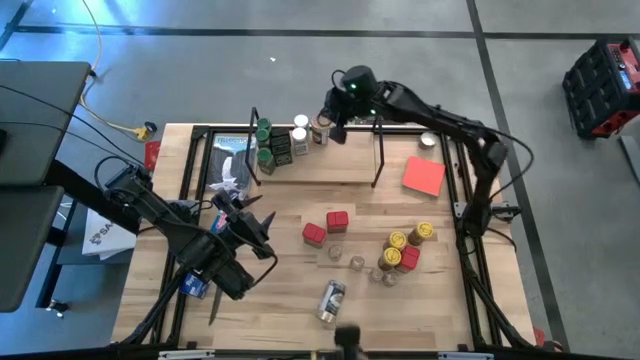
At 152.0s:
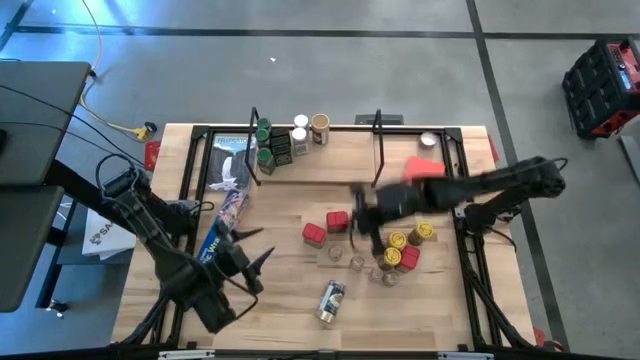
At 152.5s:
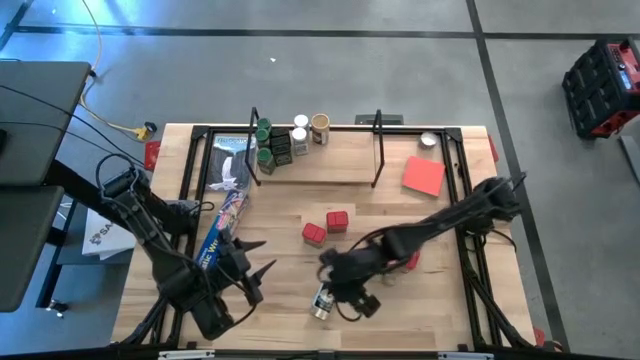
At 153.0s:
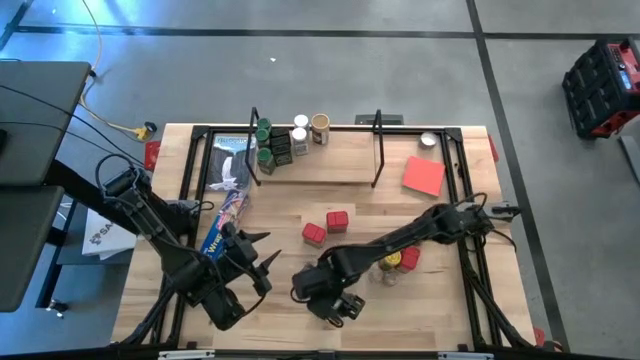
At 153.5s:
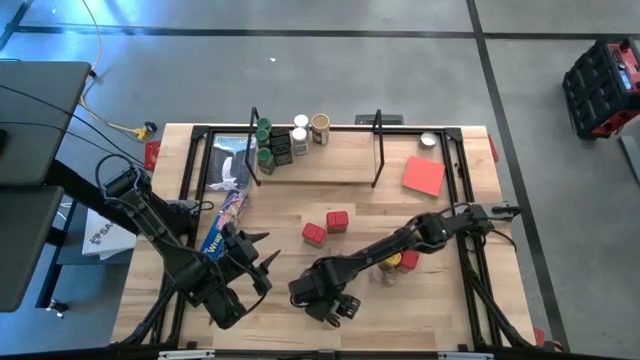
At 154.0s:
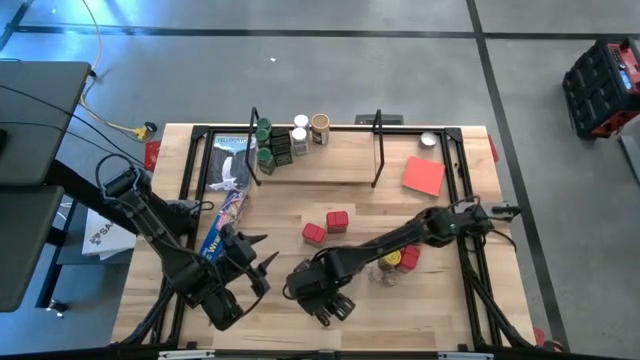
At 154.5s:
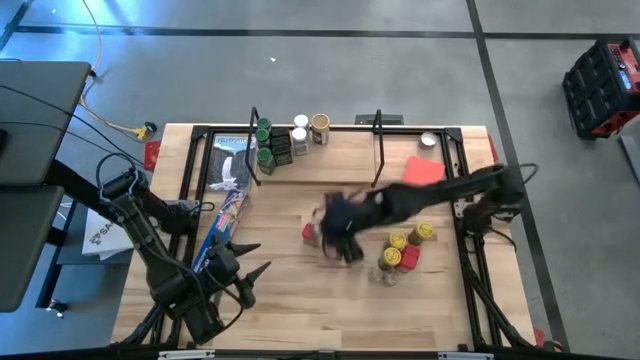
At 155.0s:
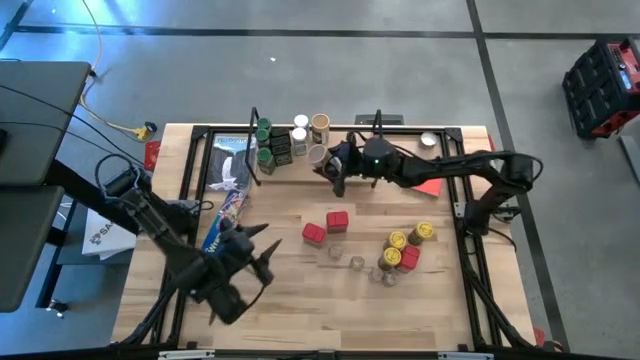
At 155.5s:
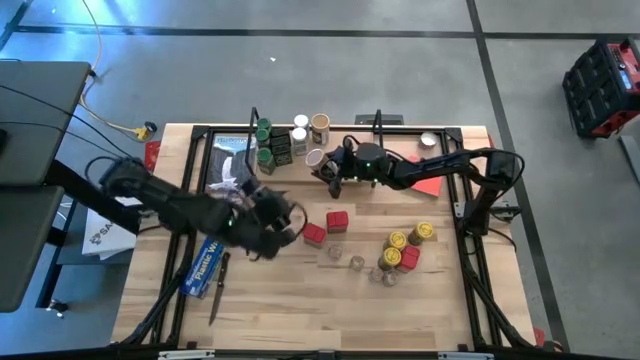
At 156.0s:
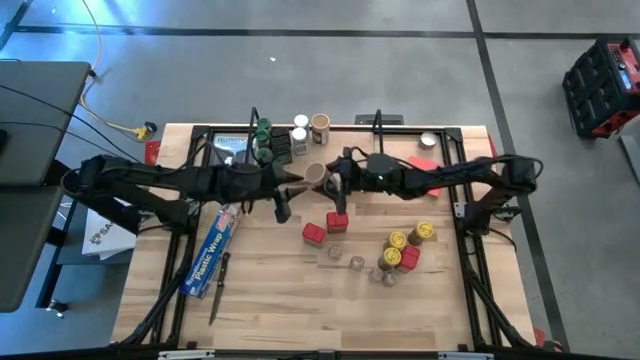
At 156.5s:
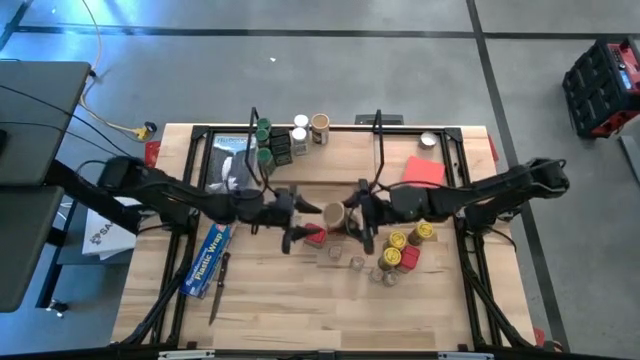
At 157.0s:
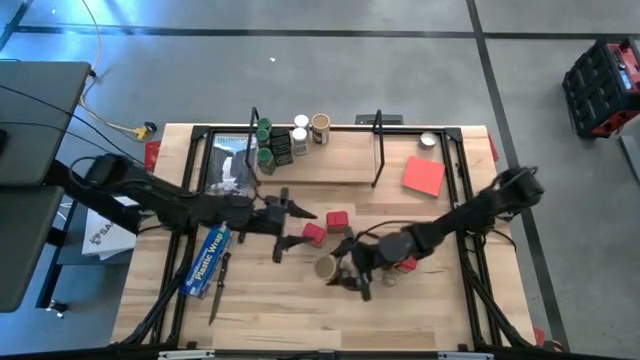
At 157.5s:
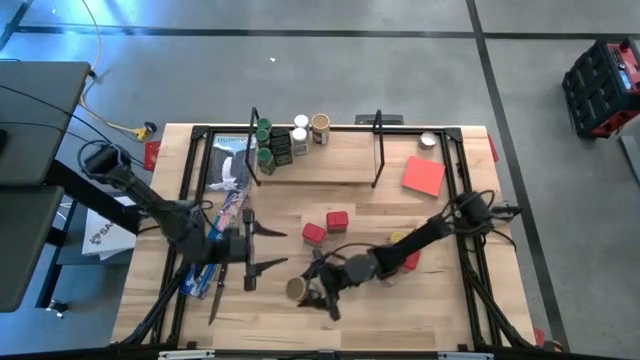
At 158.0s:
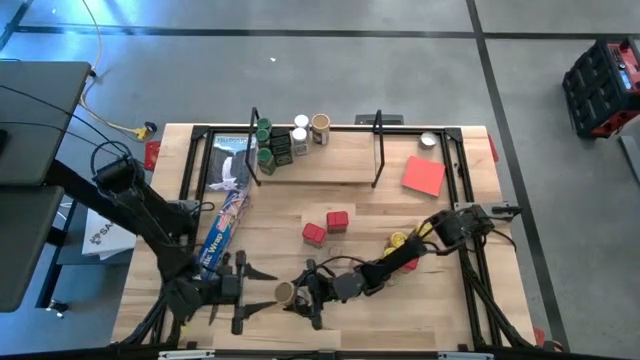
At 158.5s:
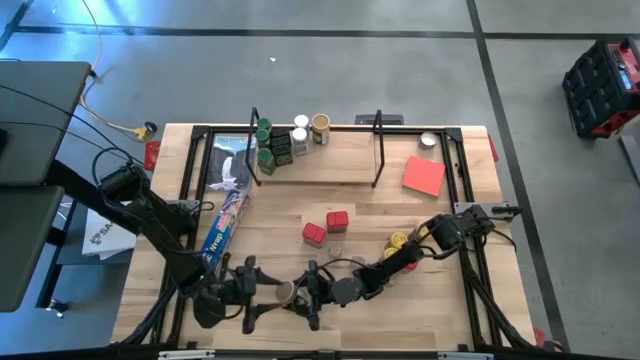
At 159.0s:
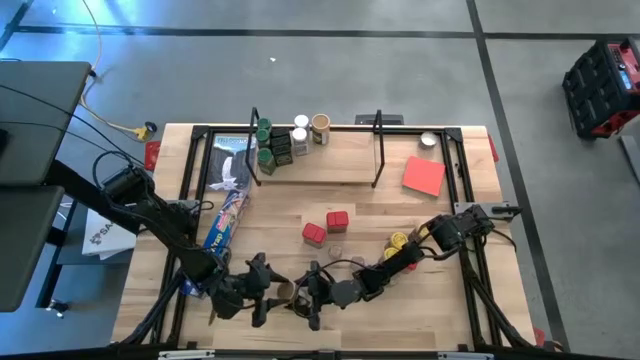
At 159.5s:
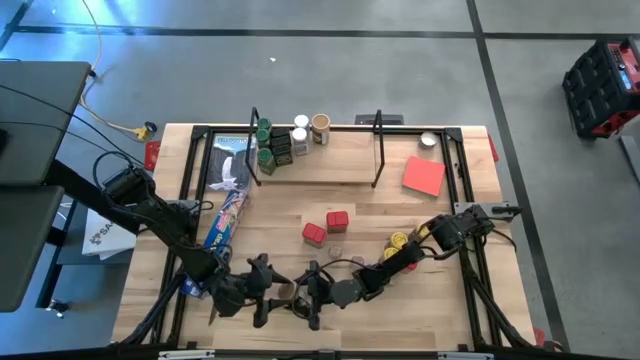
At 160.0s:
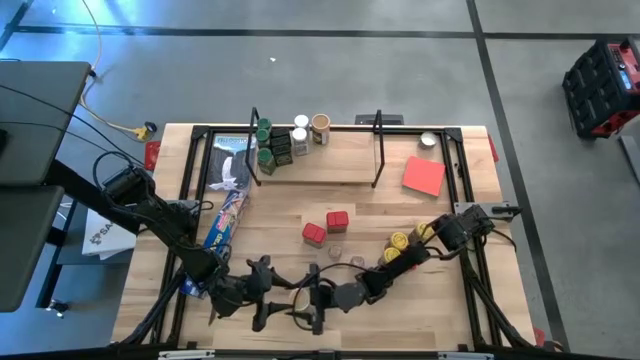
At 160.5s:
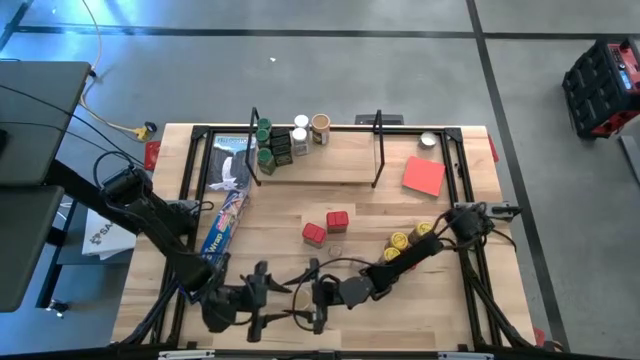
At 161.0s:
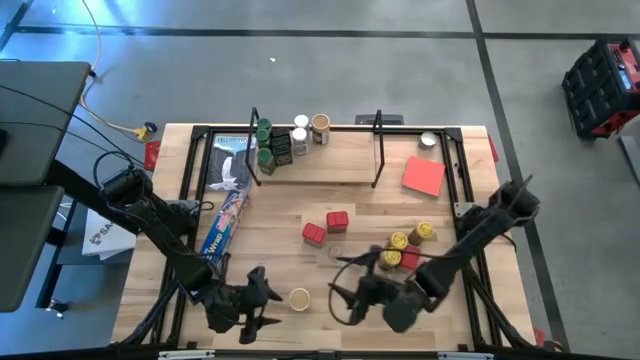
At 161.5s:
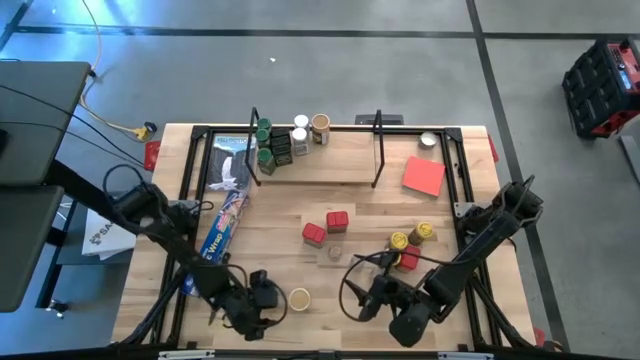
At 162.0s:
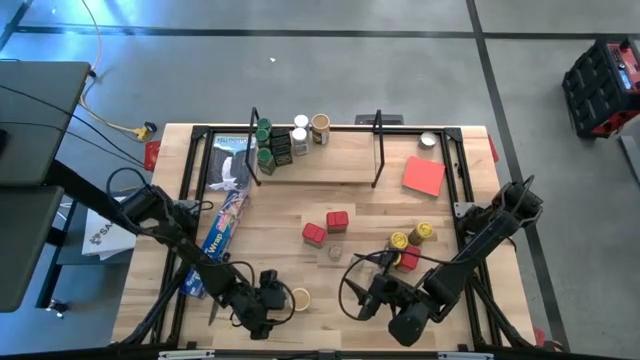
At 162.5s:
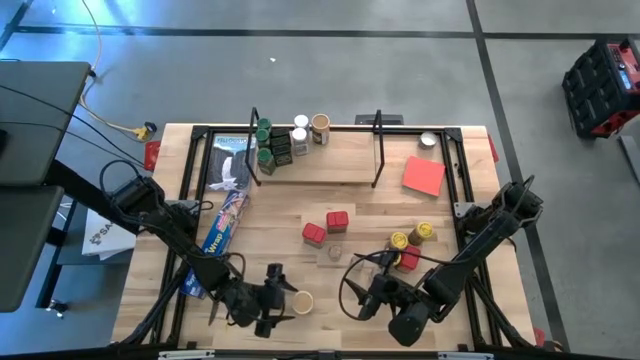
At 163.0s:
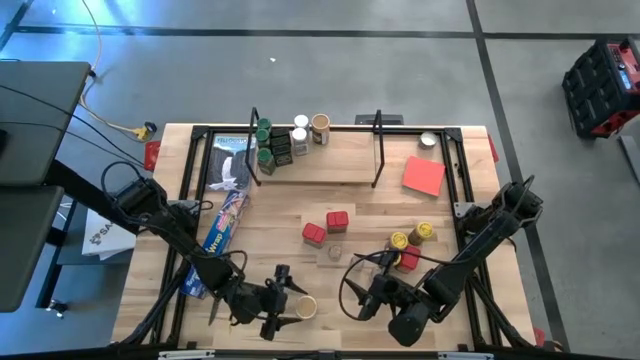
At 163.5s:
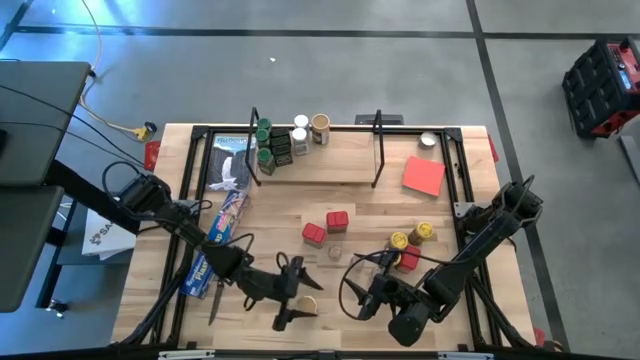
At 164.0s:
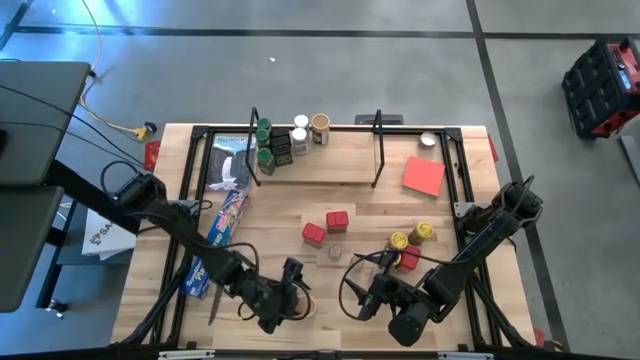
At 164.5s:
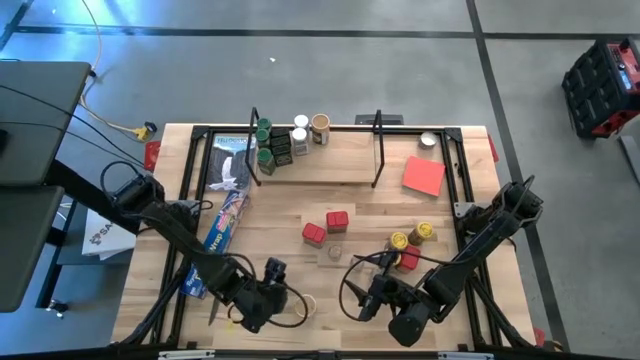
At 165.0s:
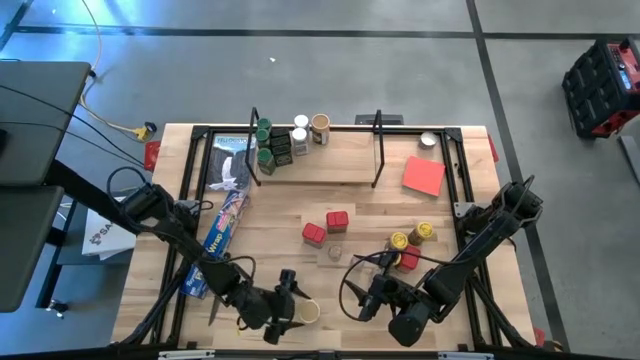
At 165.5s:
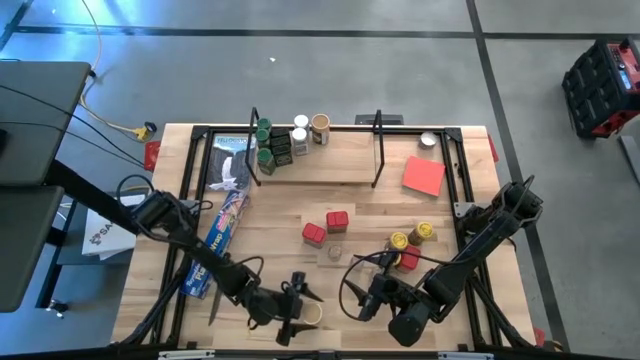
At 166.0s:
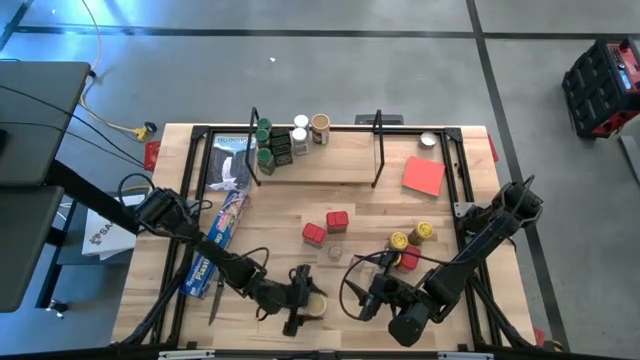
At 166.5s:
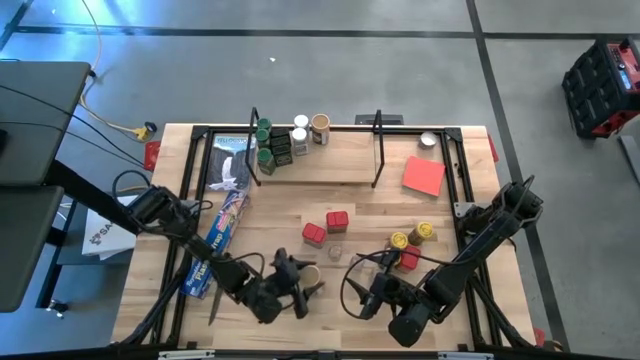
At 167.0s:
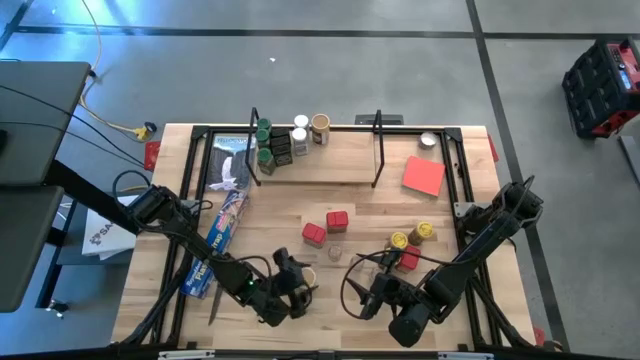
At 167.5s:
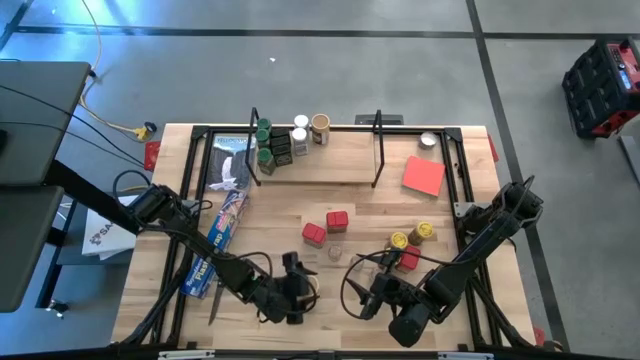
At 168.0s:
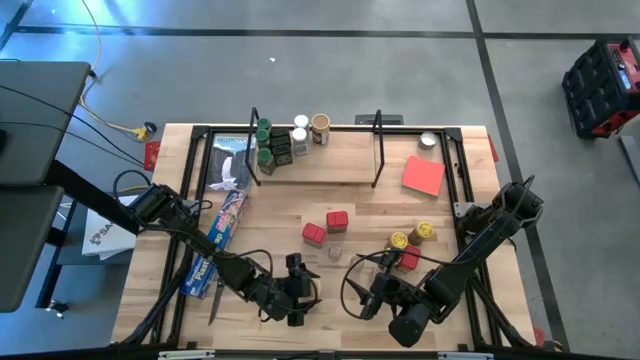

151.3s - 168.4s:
Task: Shelf spices
Put the gold seasoning bottle on the shelf and align it with the other gold seasoning bottle

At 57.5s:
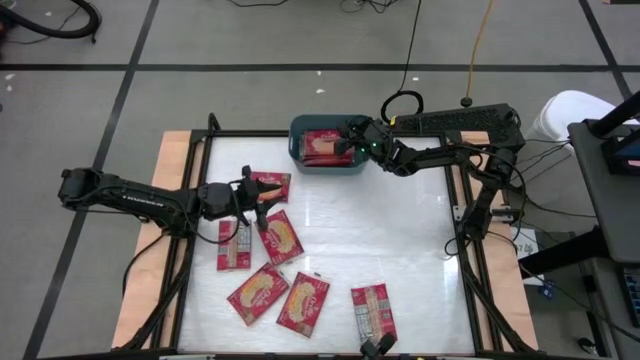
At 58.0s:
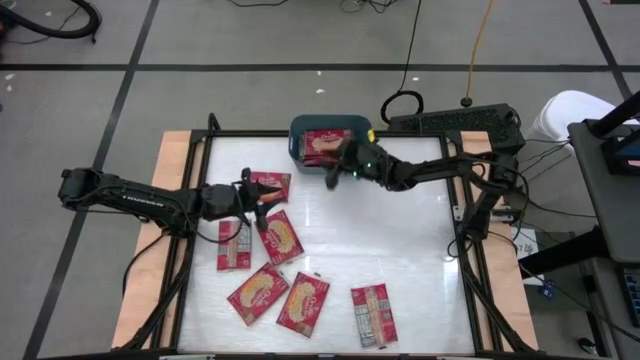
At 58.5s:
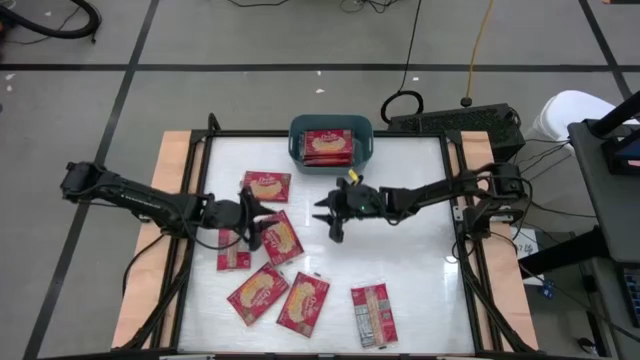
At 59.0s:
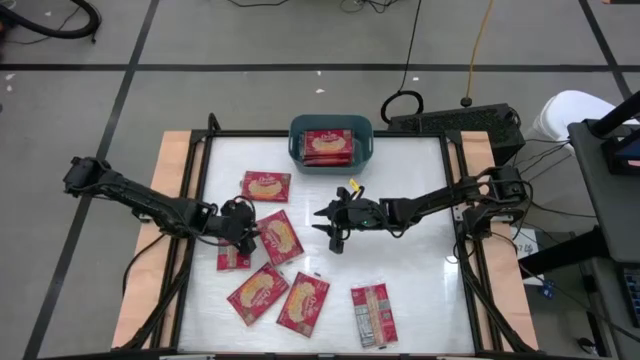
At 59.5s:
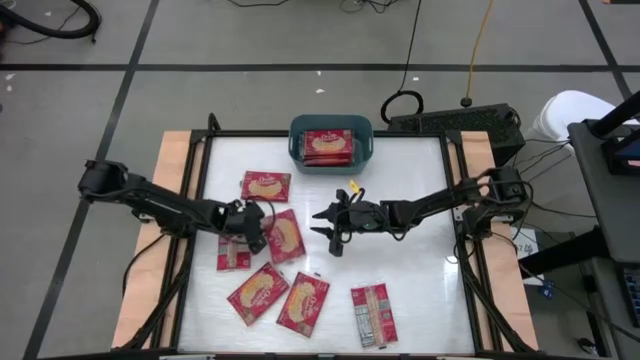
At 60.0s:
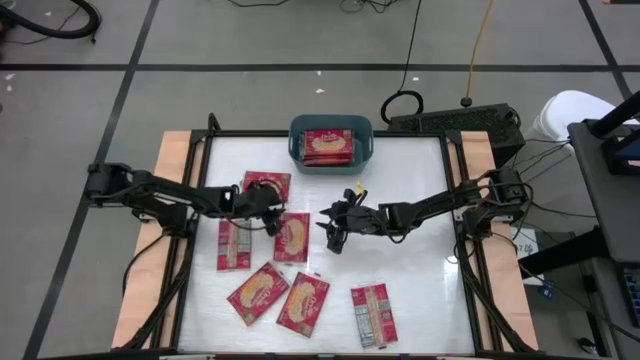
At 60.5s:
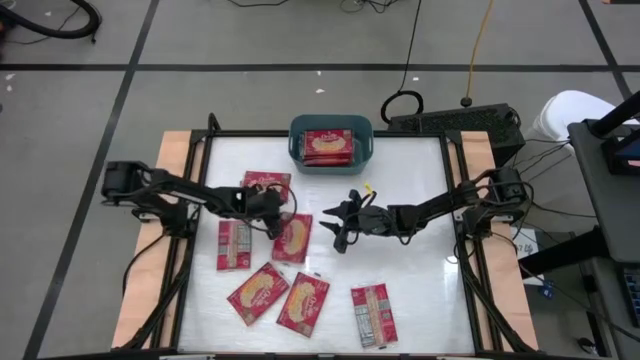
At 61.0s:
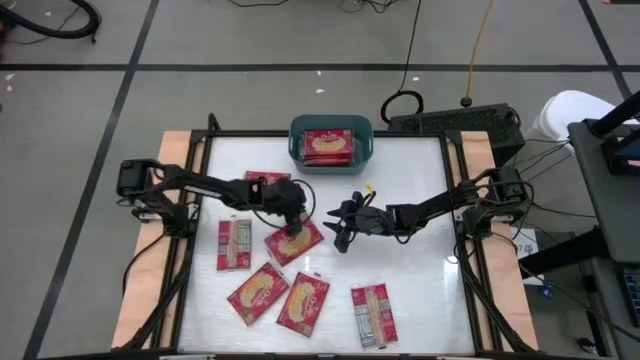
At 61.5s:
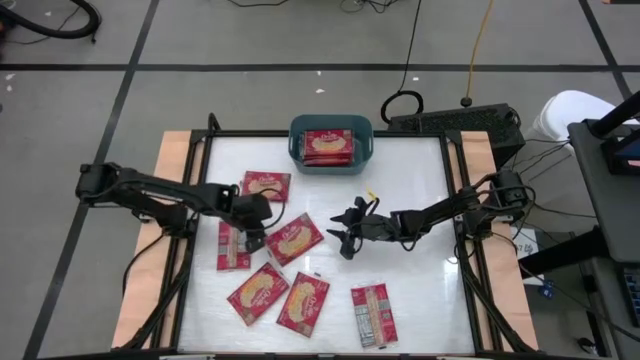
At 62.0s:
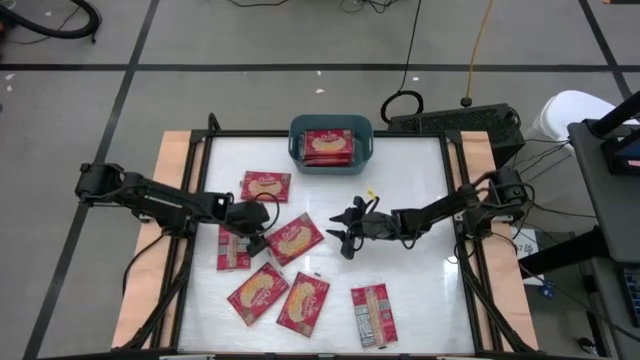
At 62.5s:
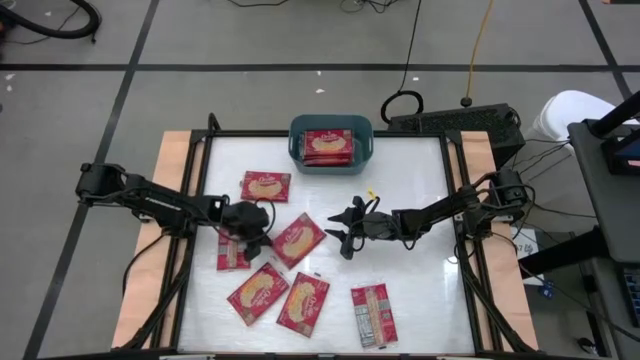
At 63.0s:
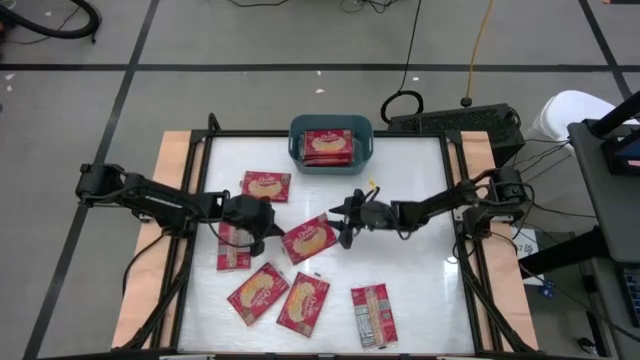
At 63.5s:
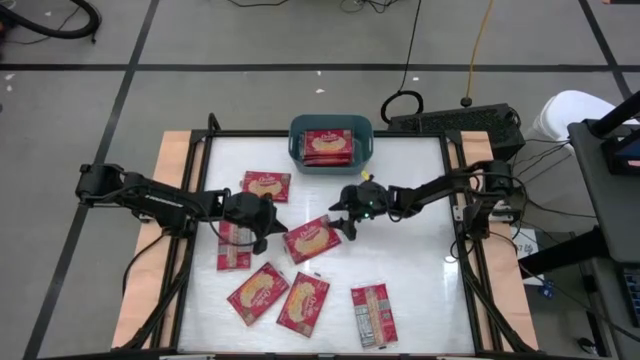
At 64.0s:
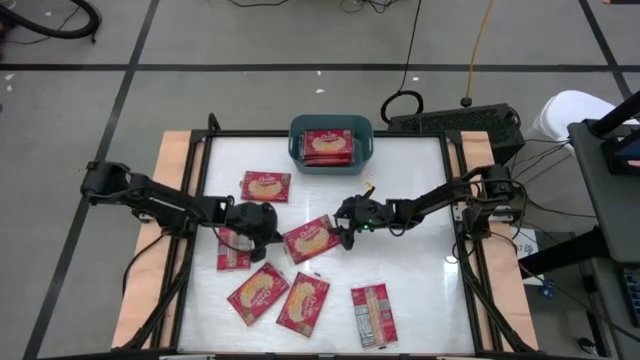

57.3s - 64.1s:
Task: Sort popcorn bags into baskets
Put the red popcorn bag into the green bin
